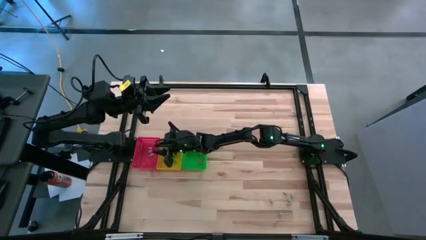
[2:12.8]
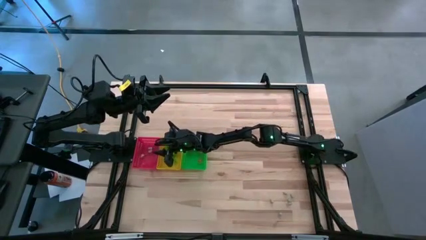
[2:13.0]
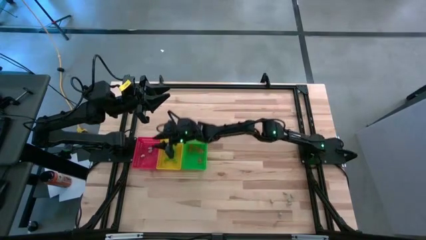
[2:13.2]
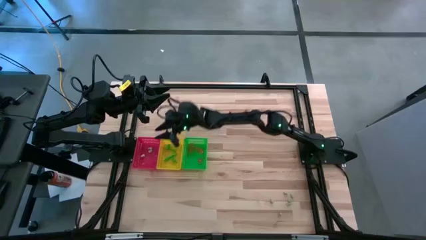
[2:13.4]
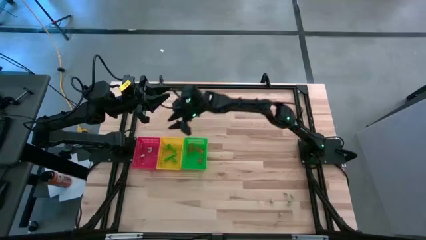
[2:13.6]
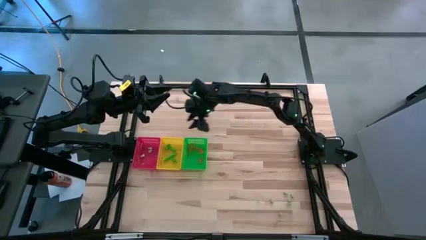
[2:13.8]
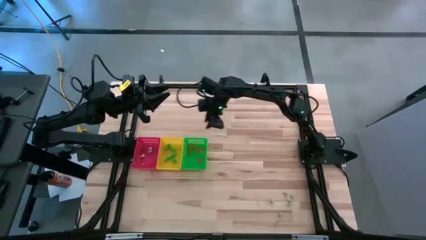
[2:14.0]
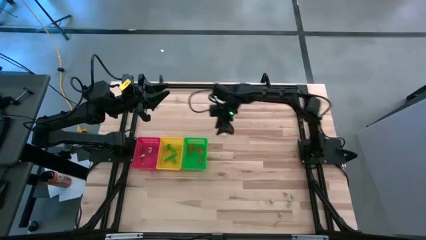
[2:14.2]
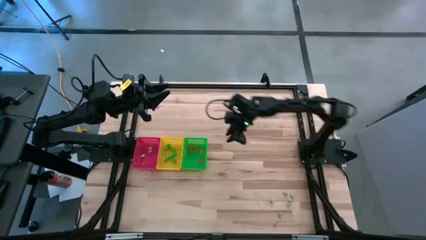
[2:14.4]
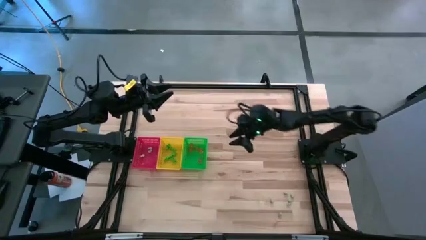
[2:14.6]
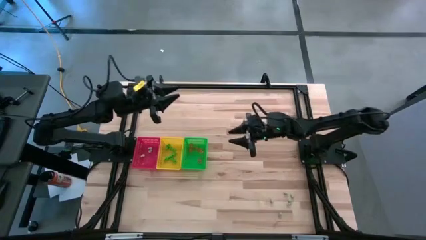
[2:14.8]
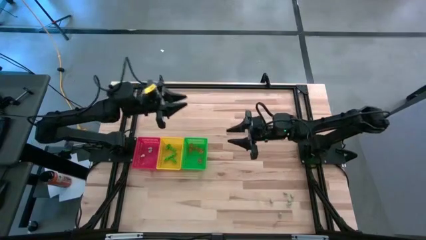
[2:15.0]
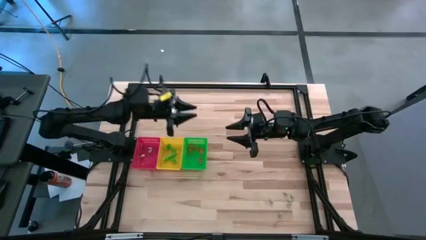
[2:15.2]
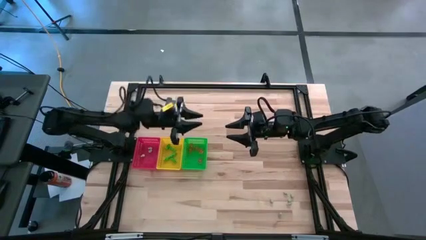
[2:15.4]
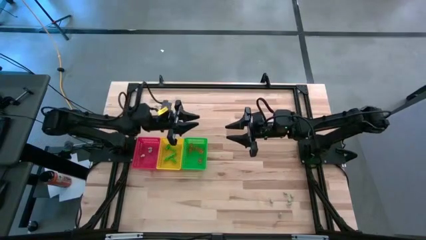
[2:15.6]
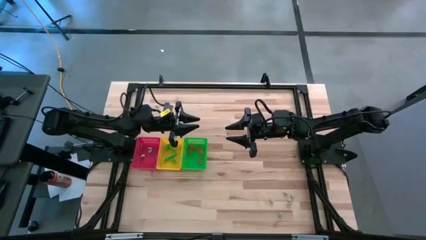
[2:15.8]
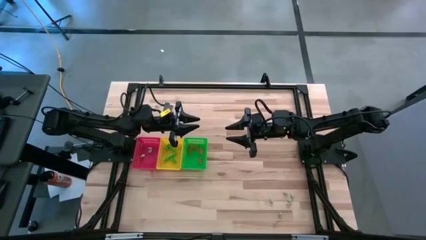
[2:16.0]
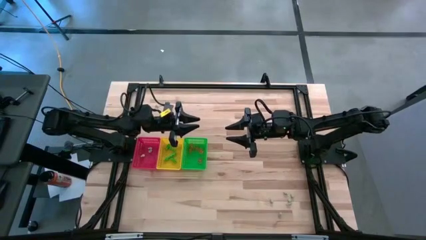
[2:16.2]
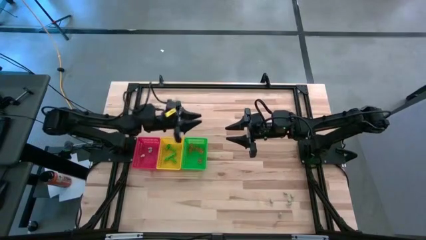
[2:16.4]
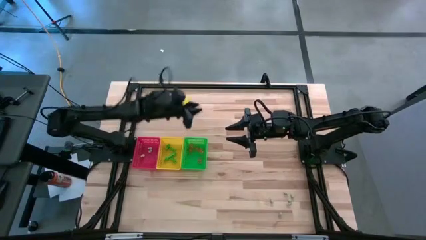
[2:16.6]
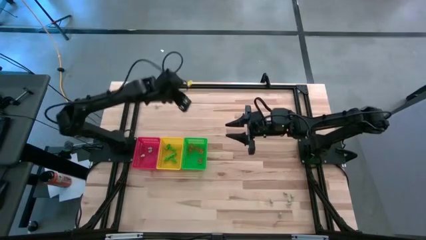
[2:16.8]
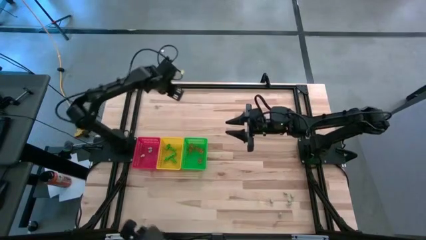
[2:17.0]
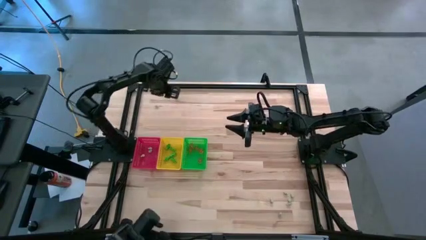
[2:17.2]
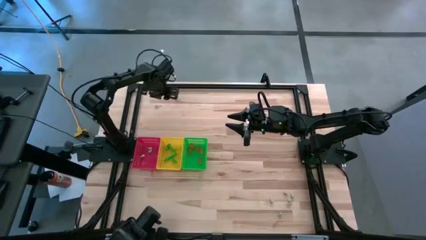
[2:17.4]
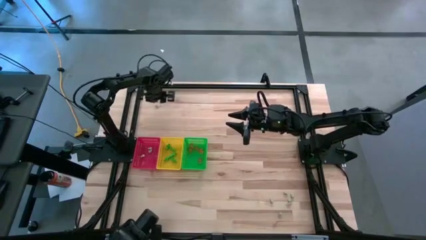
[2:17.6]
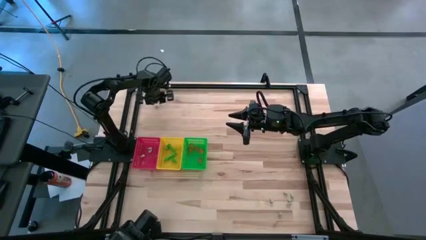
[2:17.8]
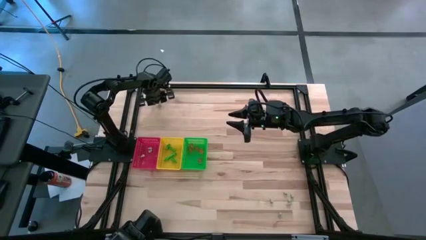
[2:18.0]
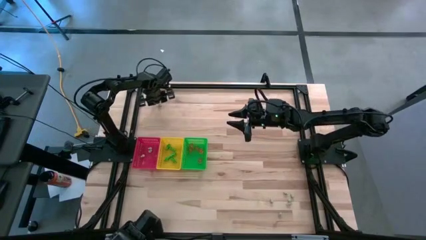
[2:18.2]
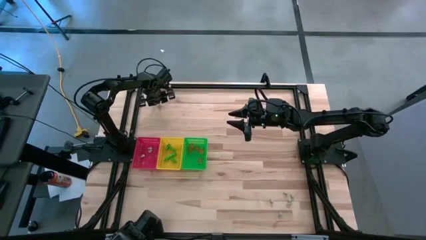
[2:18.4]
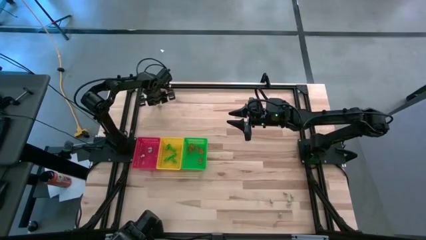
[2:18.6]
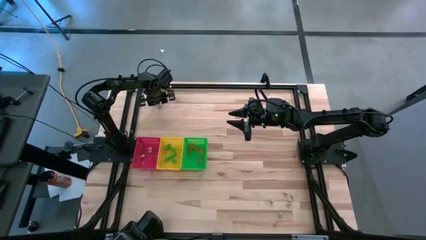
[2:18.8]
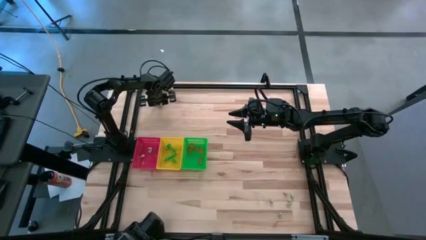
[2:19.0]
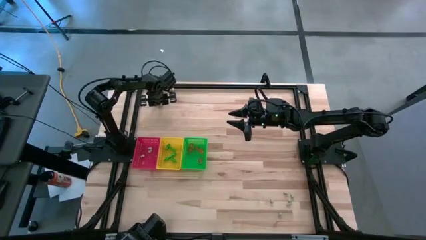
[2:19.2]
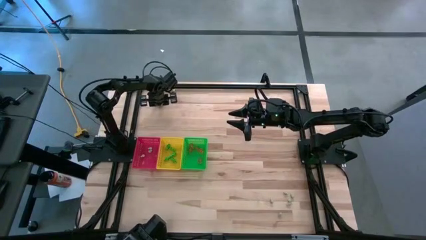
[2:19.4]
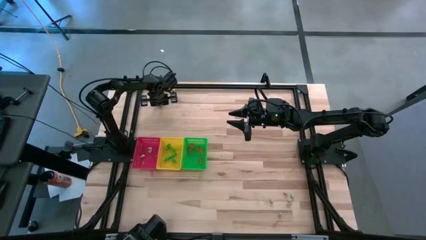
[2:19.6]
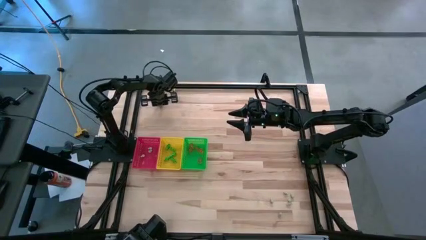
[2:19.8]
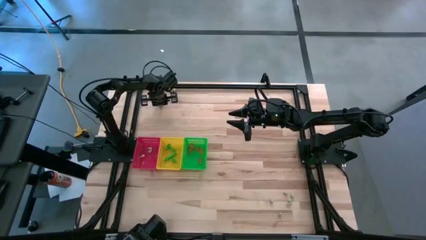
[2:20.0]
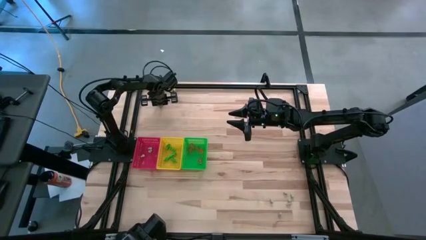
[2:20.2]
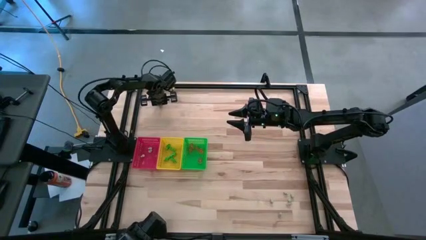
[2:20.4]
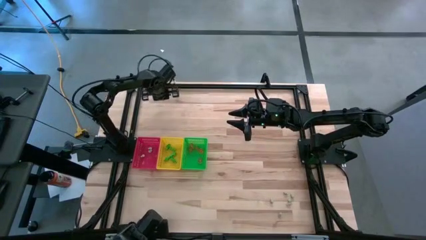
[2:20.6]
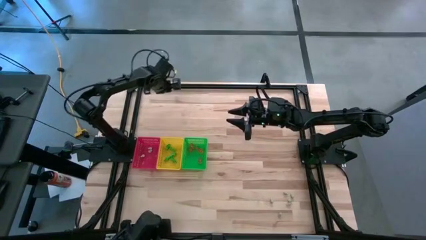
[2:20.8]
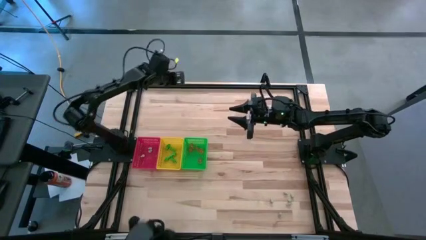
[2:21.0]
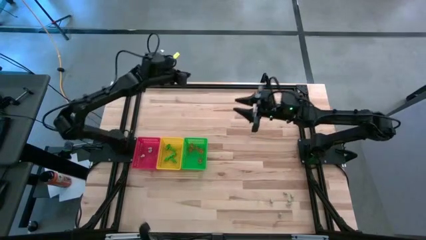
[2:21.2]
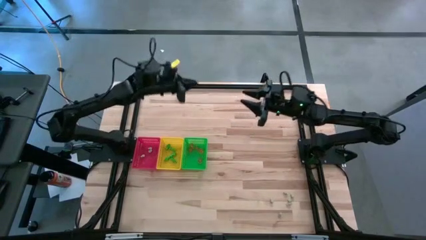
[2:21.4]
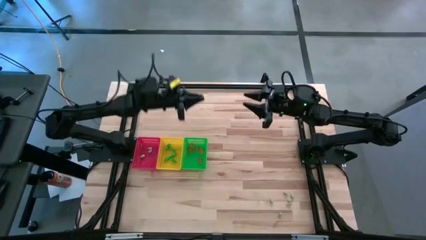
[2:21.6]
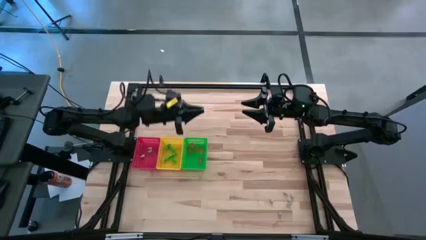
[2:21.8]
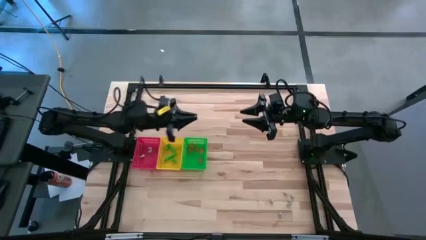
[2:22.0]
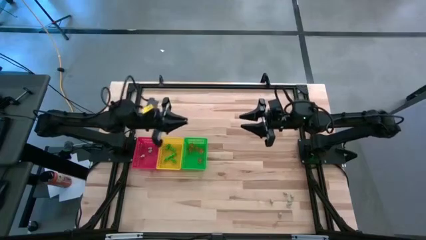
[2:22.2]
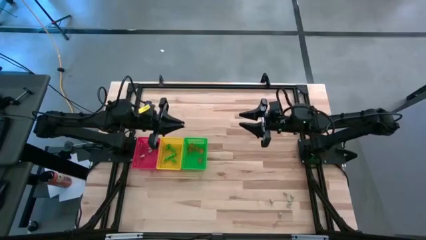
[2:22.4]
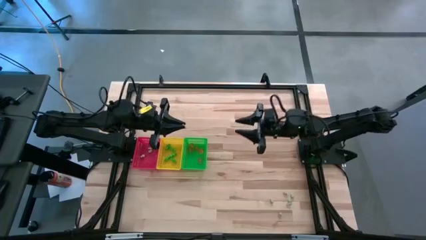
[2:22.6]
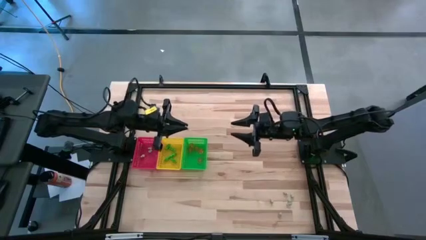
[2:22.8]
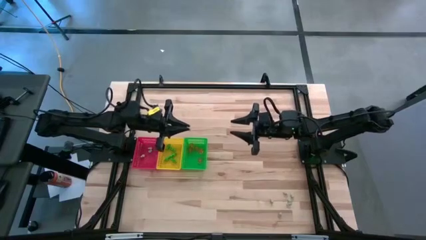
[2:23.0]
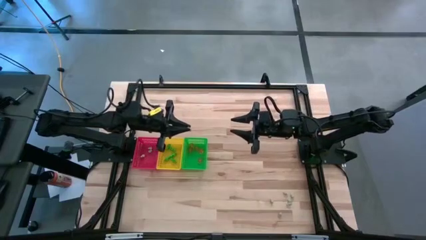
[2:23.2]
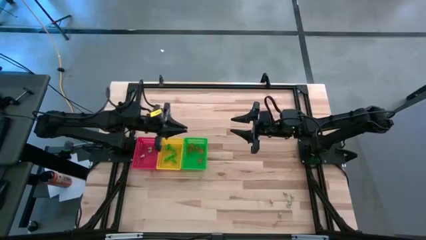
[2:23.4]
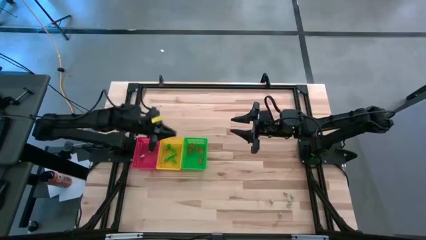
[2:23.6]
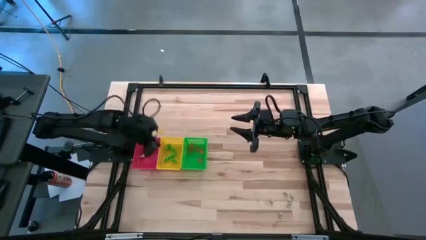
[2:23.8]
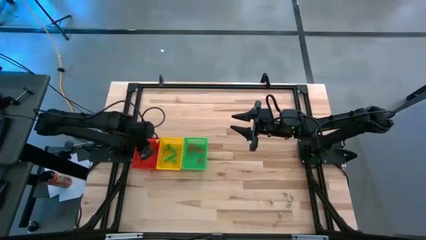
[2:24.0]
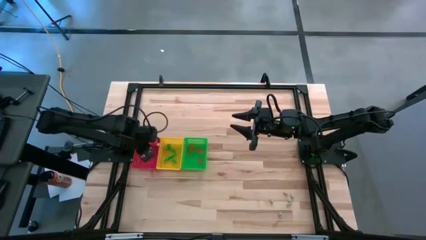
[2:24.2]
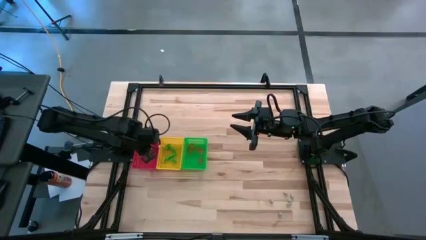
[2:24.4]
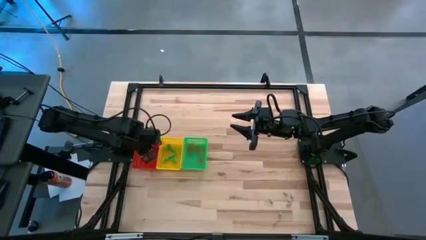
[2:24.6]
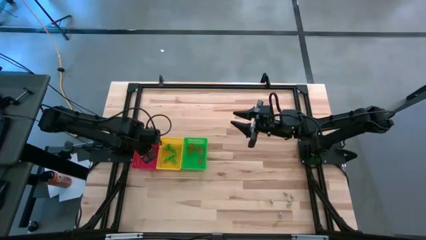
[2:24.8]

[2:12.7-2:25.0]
Task: Sort Halloween decoration
Put the white skull toy into the red bin

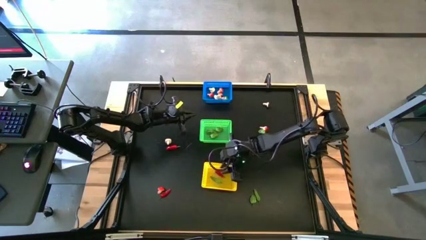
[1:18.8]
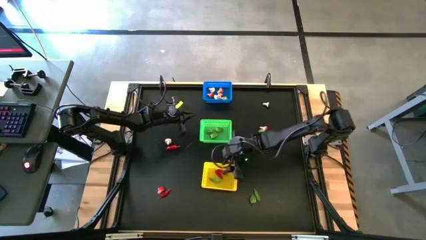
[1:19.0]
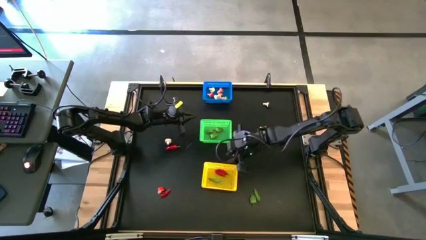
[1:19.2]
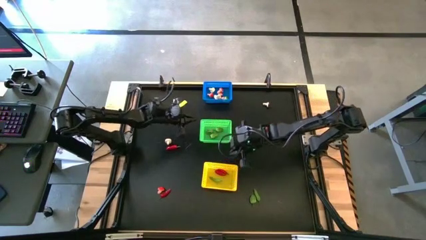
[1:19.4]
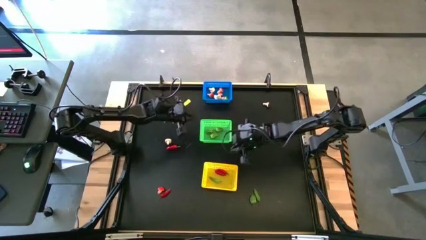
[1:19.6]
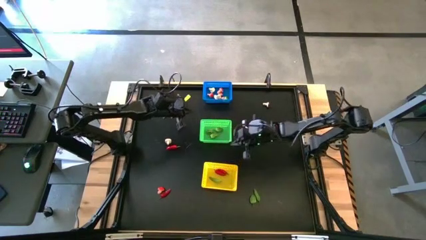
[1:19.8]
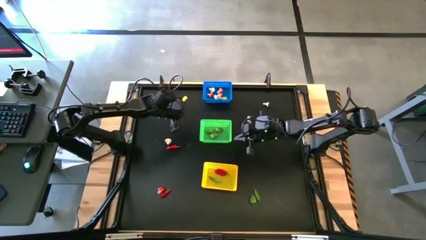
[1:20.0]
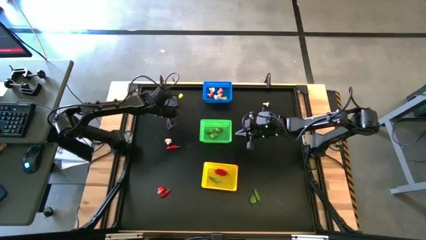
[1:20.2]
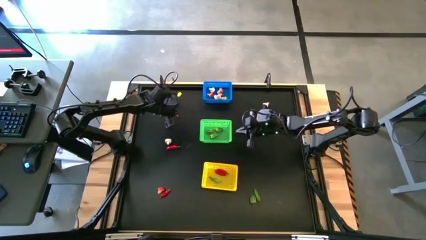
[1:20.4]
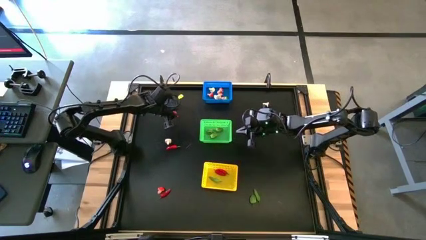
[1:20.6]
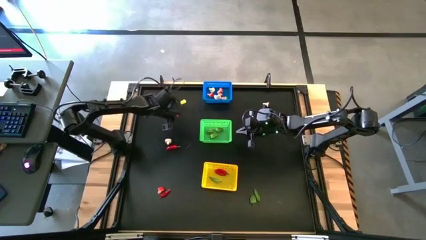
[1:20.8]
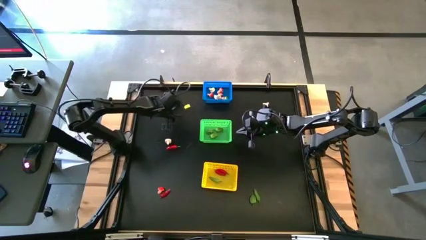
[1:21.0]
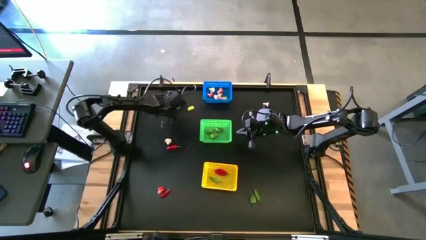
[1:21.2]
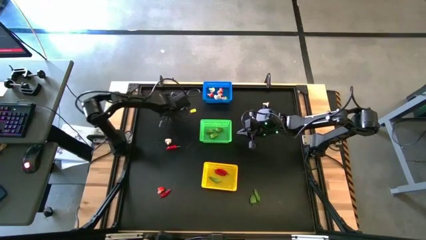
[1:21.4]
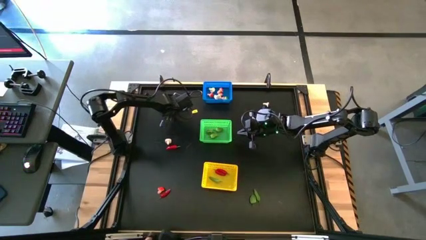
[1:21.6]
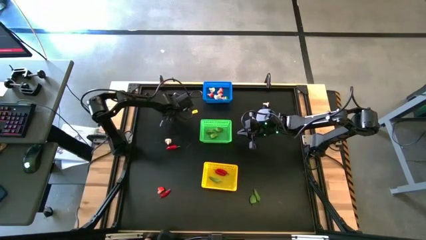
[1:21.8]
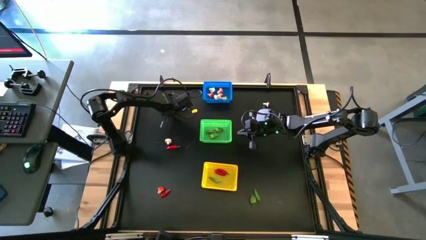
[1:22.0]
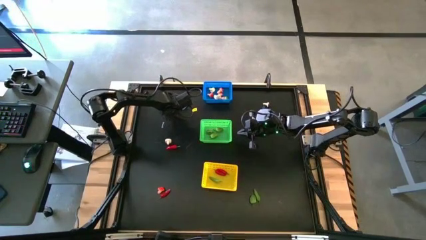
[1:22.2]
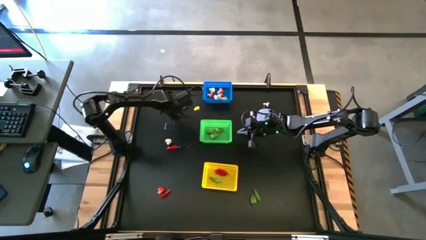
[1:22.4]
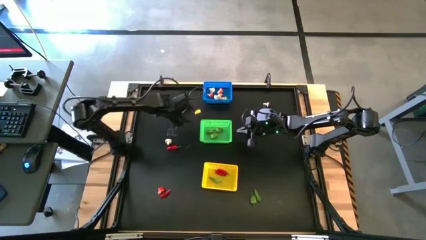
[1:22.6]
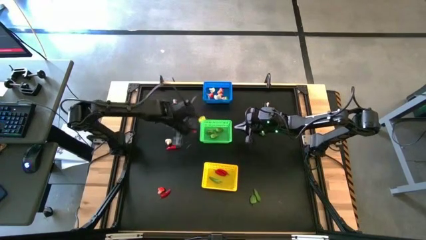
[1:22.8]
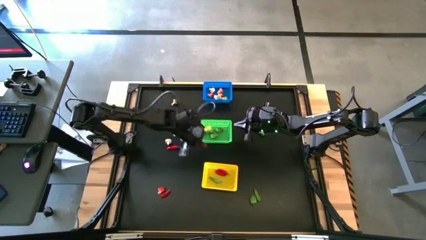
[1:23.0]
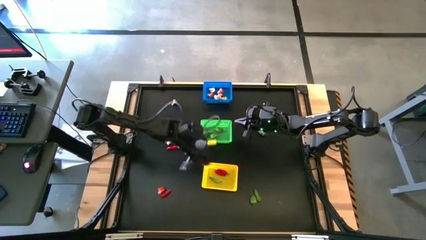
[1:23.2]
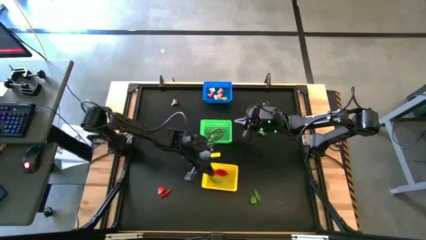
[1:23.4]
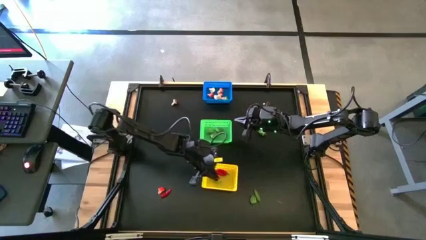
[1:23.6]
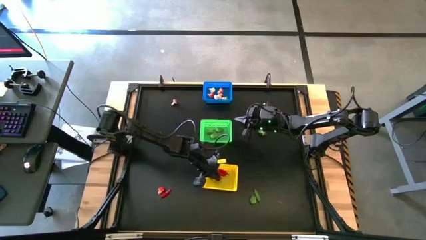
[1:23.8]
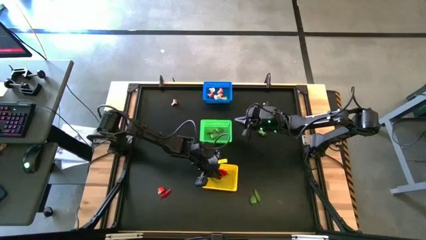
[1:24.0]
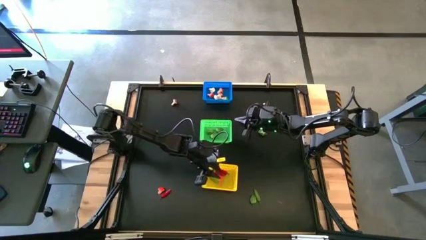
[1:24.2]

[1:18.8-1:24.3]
Task: Sort produce into baskets
Put the orange chili pepper into the yellow bin
